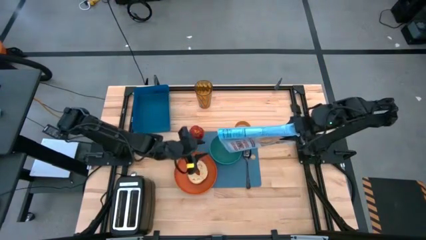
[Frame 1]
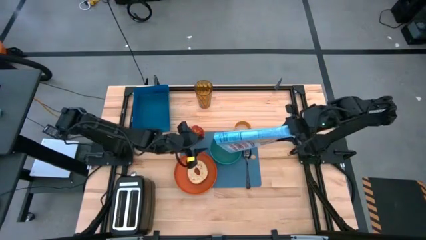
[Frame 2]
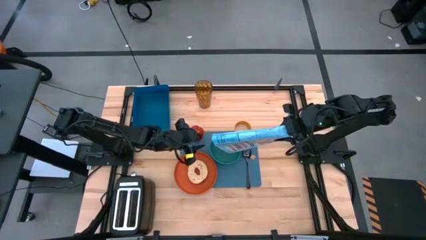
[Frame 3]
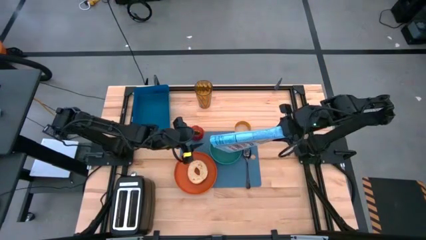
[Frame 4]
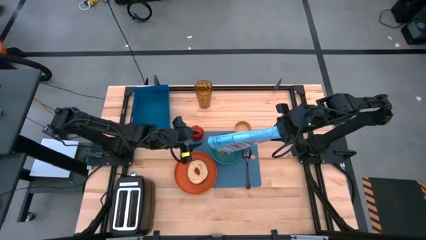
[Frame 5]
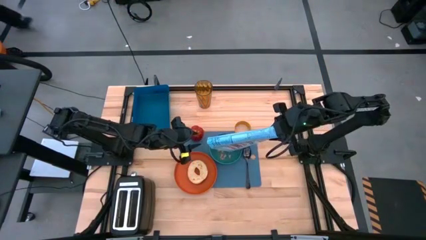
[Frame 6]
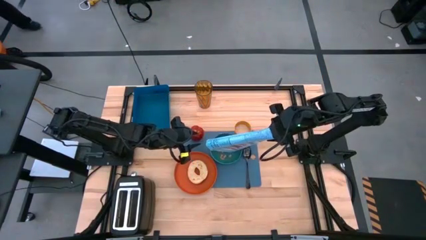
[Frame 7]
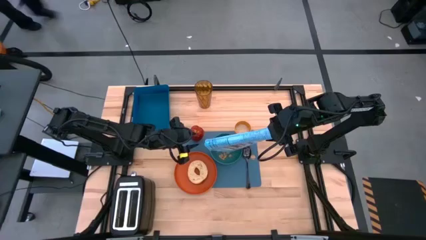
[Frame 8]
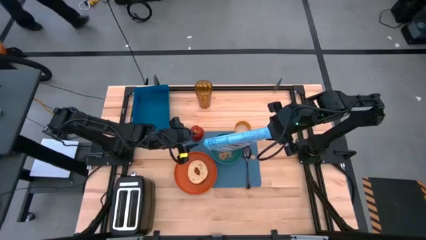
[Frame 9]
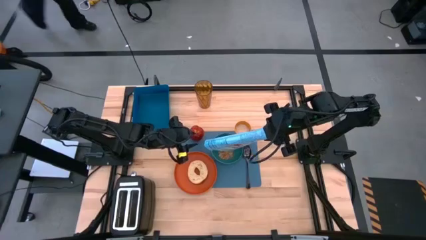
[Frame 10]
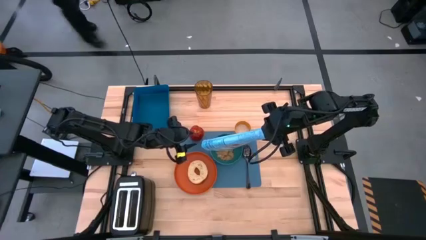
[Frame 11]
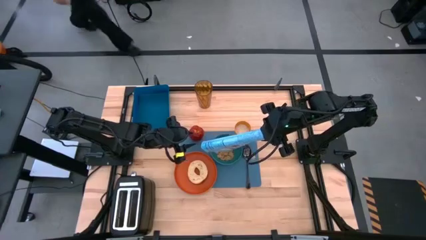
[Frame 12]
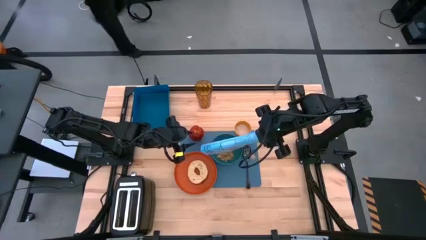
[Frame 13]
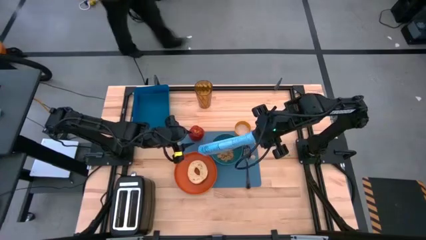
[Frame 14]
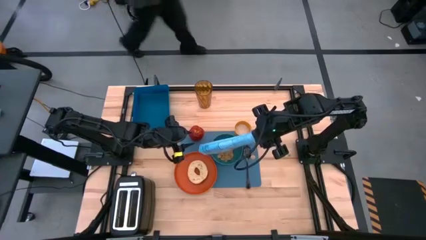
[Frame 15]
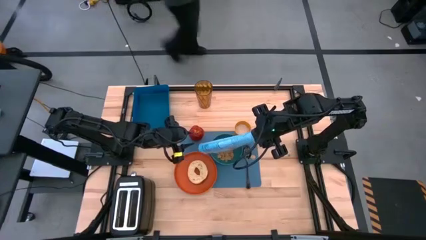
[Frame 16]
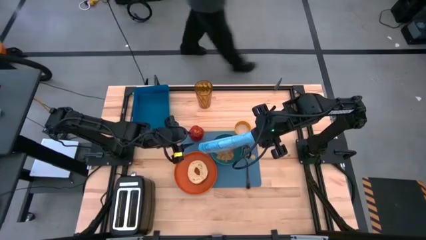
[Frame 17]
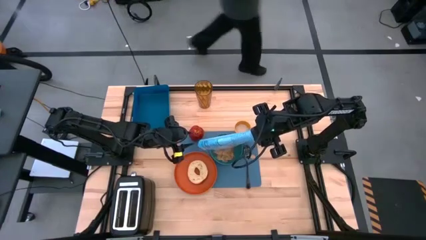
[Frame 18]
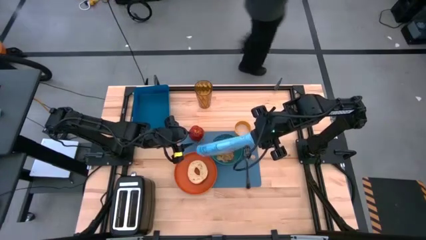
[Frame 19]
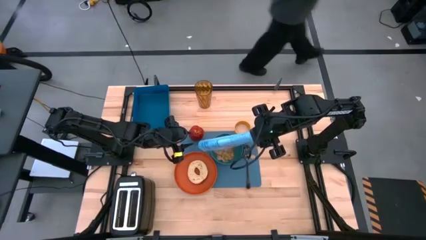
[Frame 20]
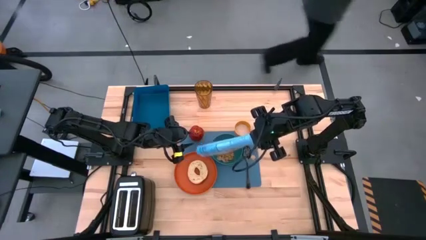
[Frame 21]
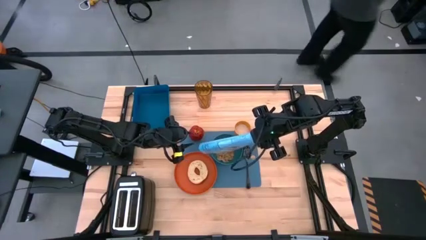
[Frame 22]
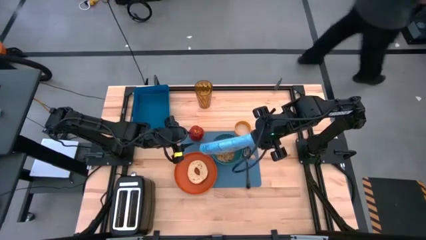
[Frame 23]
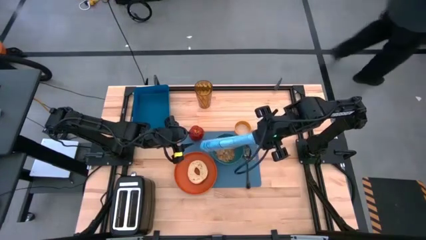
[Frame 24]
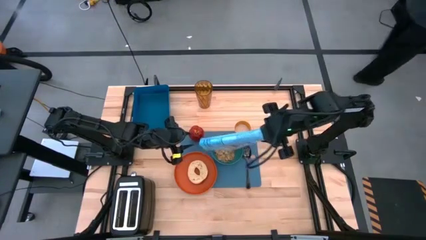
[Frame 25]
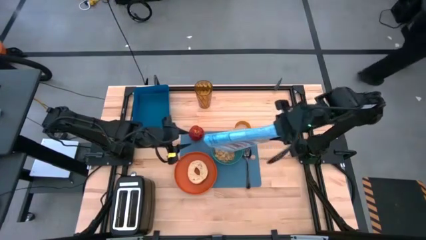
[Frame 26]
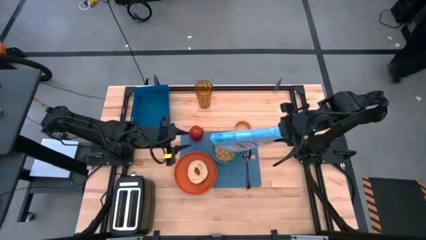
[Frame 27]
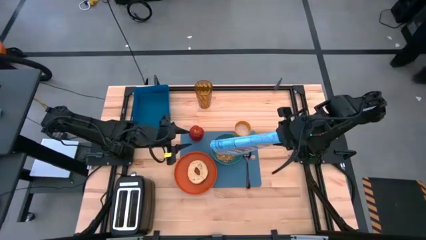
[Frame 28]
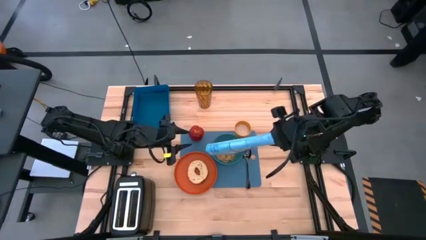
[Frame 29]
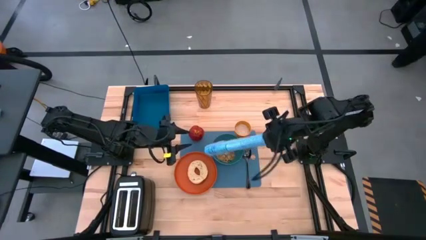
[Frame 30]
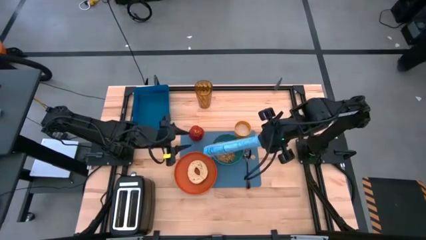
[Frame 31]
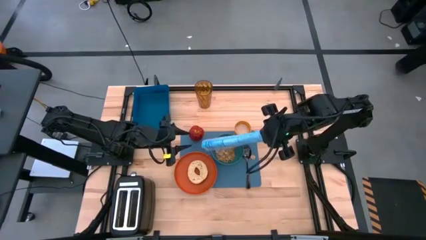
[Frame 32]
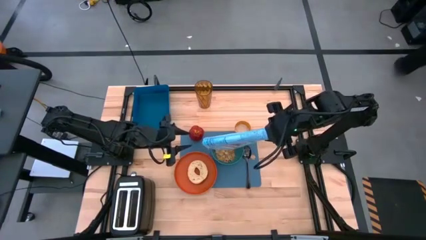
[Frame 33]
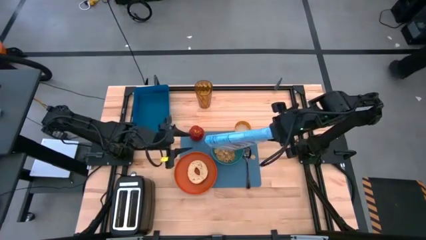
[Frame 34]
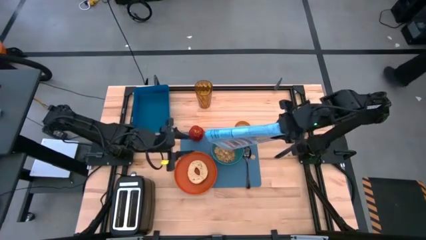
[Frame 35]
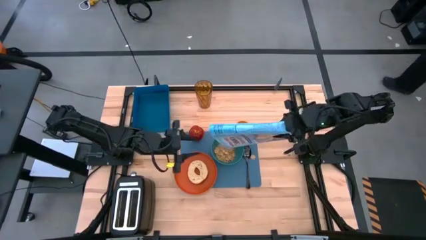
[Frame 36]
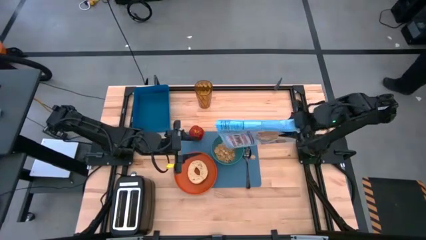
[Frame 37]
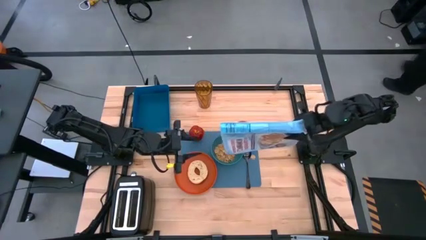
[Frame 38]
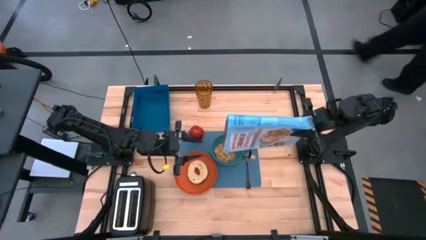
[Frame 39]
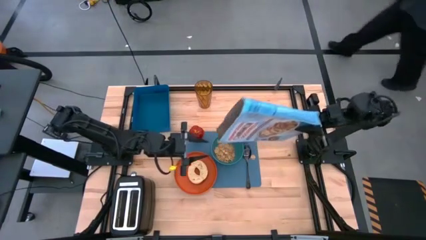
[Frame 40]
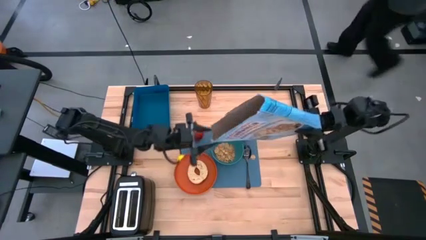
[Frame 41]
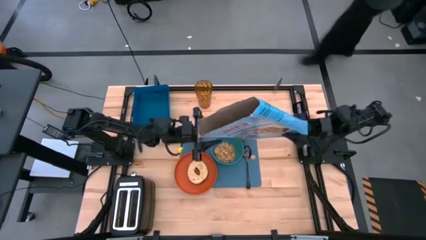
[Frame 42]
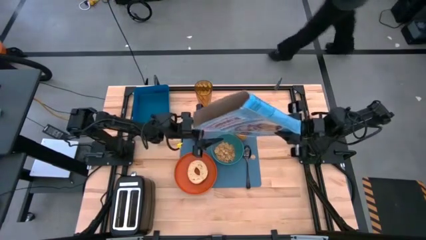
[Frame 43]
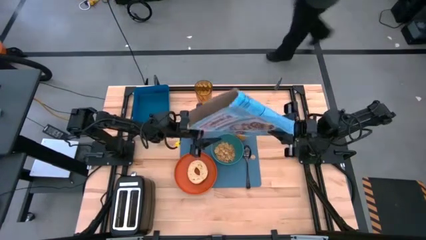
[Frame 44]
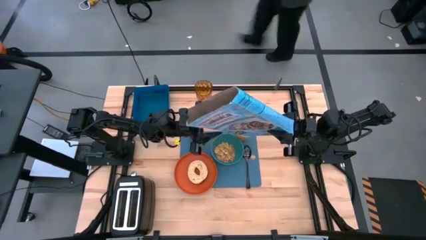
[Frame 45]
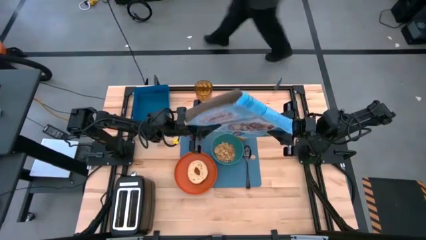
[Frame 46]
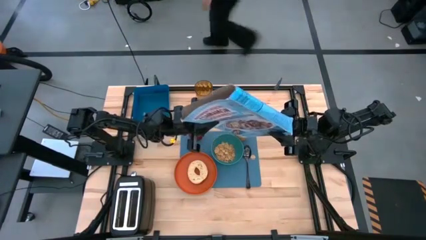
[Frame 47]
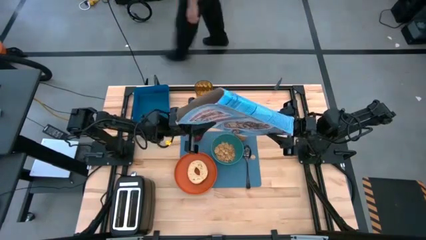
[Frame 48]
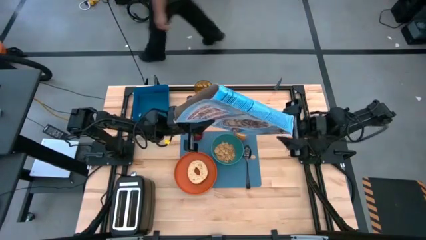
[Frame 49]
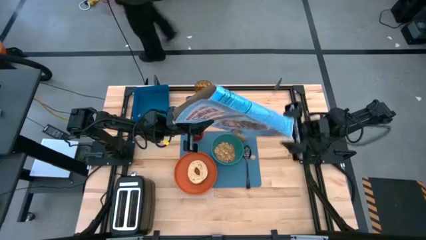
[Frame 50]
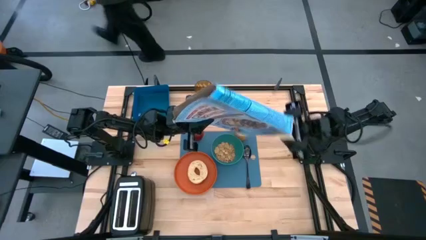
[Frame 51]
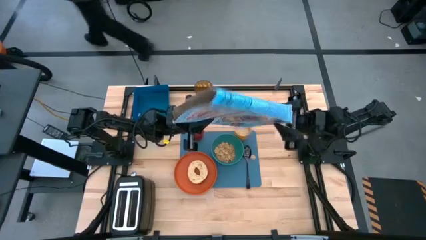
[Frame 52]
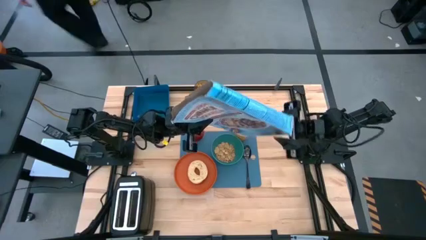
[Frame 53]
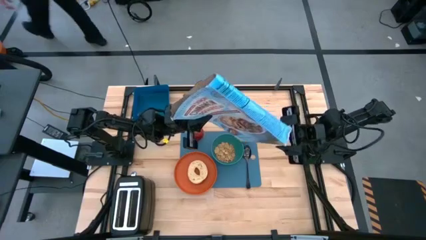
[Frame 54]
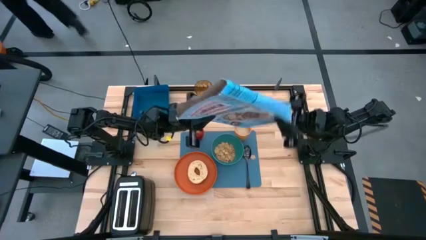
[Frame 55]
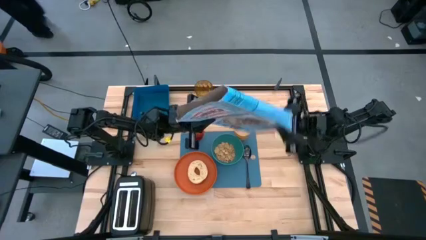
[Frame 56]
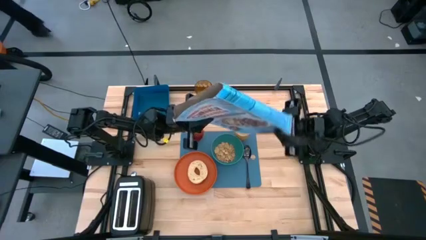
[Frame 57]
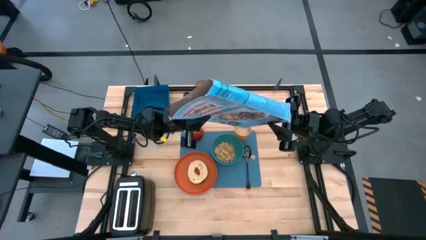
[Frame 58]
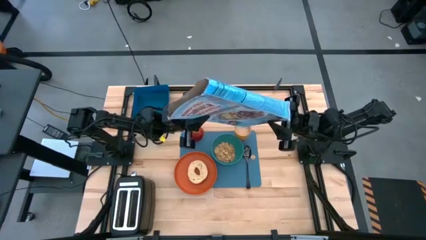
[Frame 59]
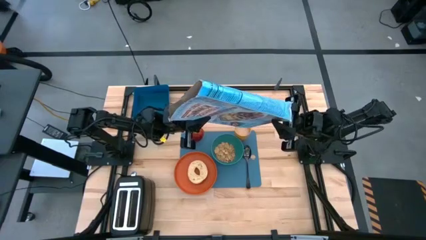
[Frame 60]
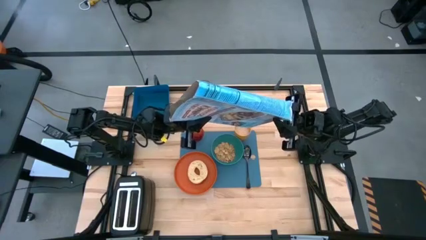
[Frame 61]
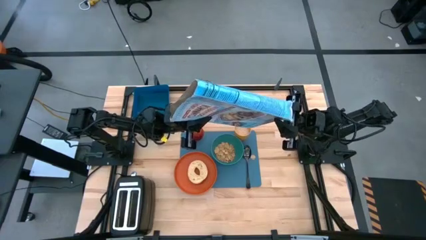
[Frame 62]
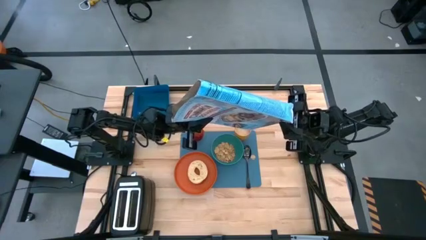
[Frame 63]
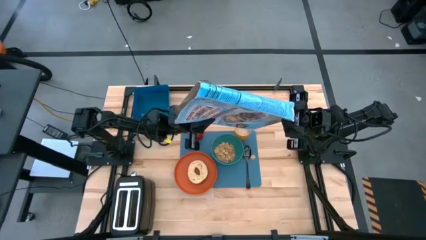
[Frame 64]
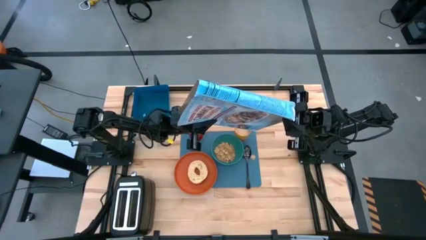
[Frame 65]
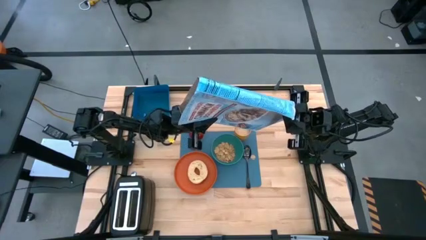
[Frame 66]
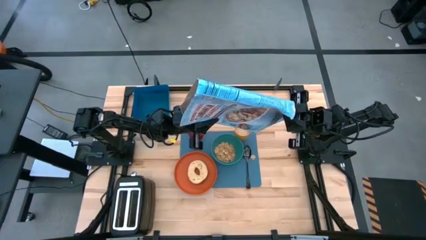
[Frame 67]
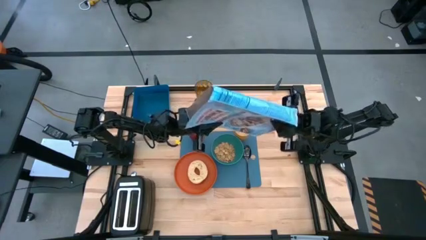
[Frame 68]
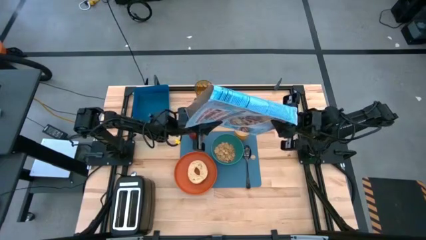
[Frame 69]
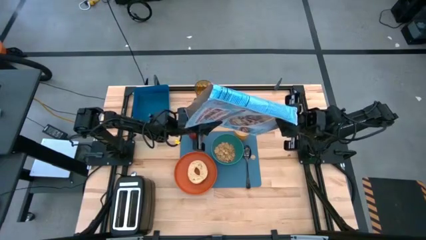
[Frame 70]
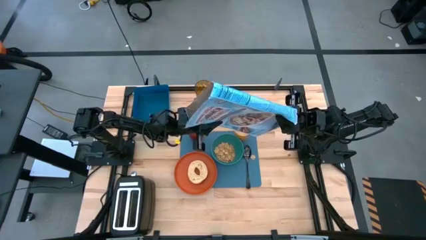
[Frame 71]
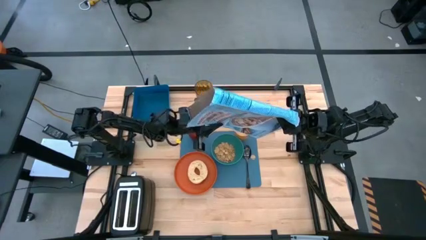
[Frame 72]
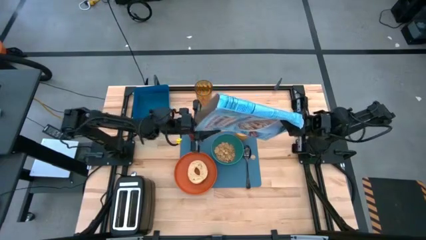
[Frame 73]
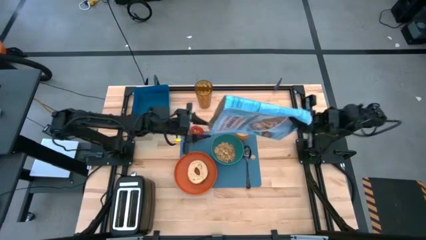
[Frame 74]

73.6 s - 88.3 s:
Task: Arrange a breakfast setting
Pour the cereal into the green bowl
